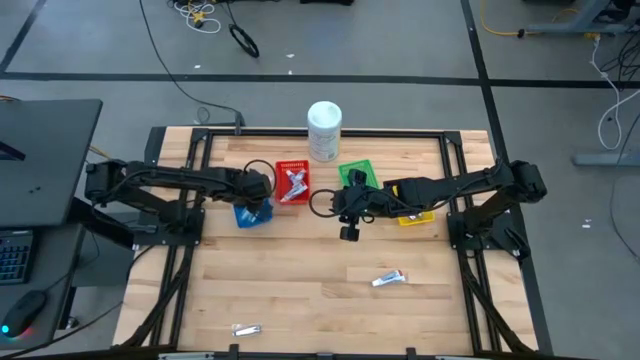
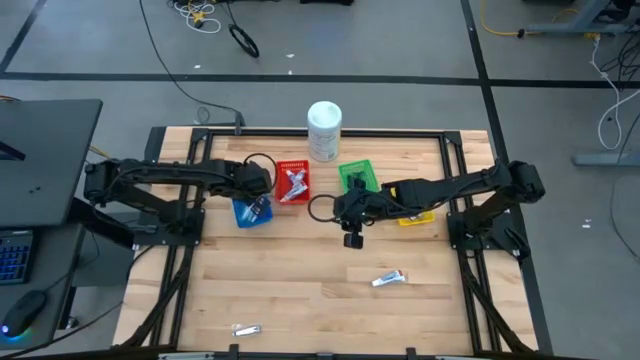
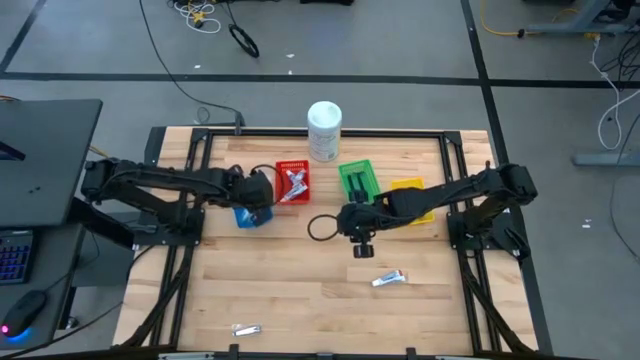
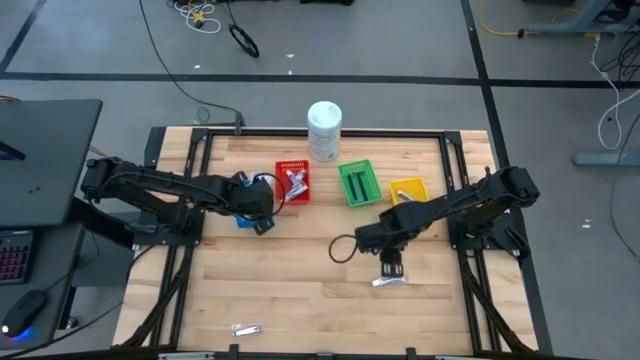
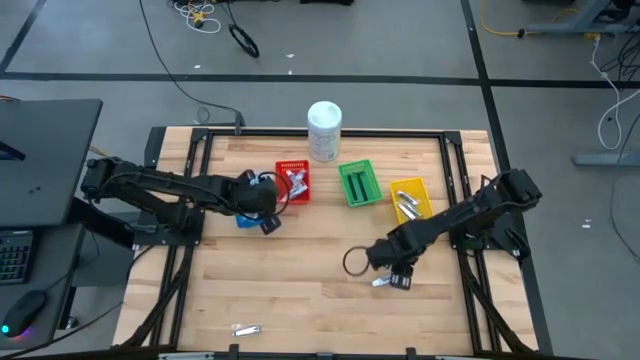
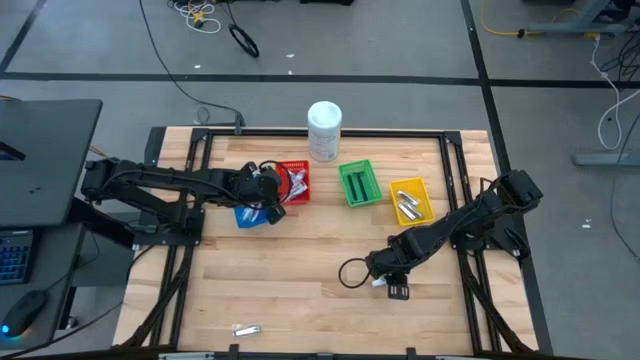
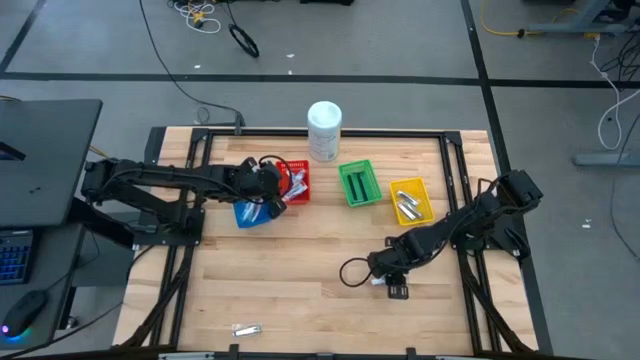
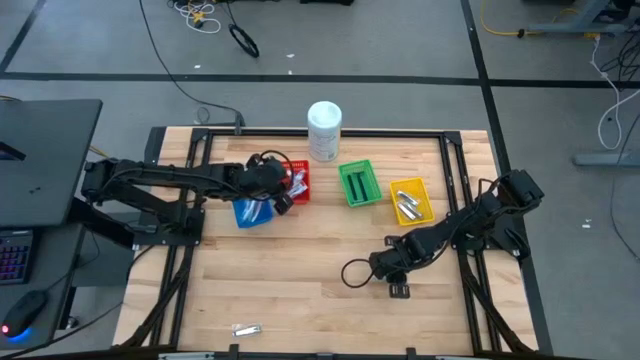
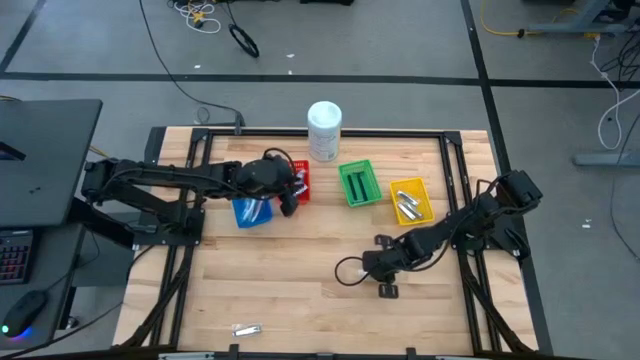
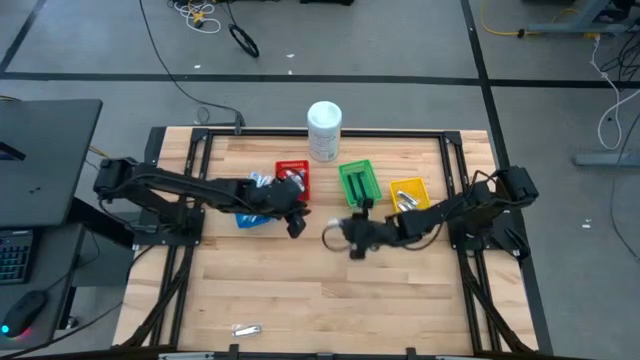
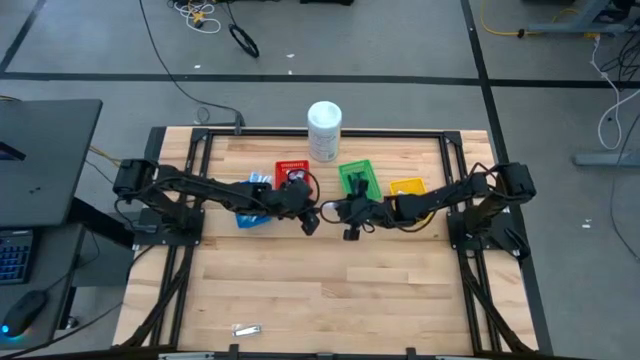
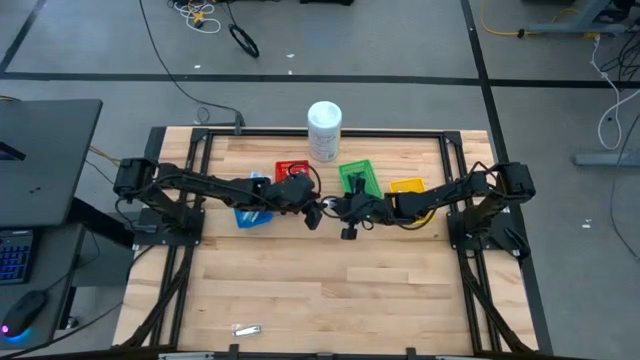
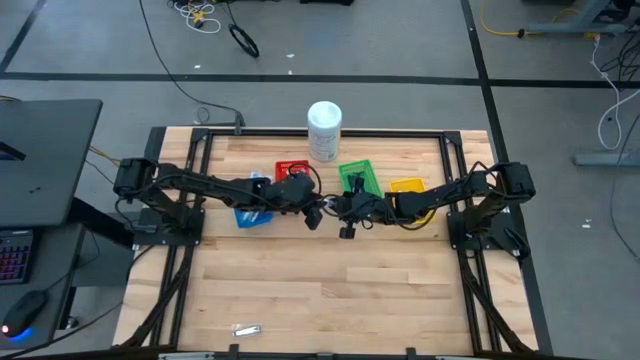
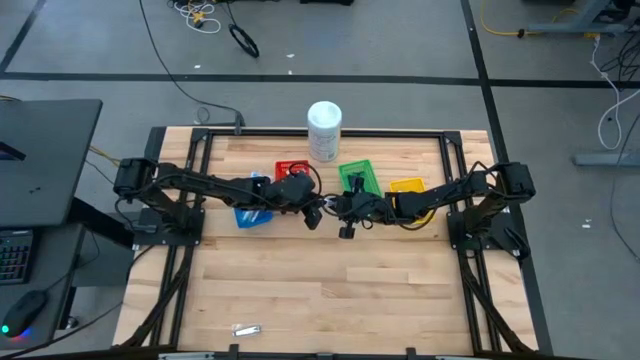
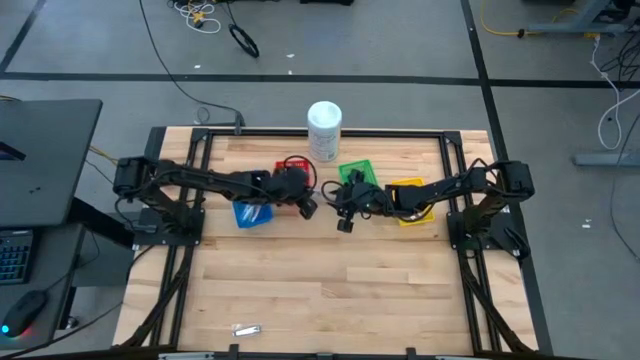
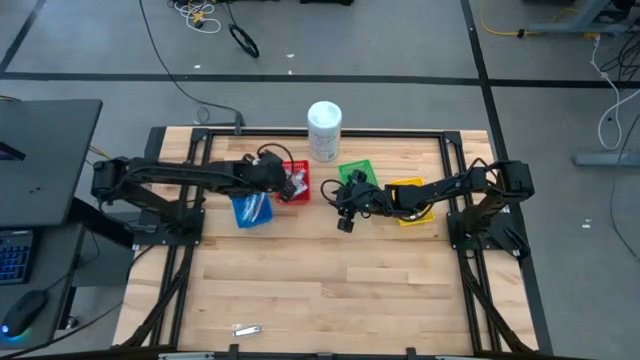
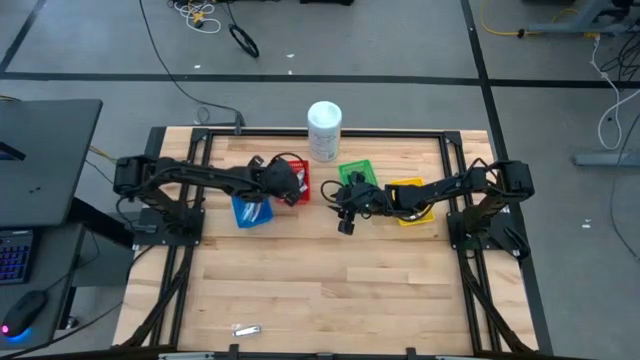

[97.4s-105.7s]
Task: Pick & Place Travel size toiletries
Put the white toothpaste into the red bin

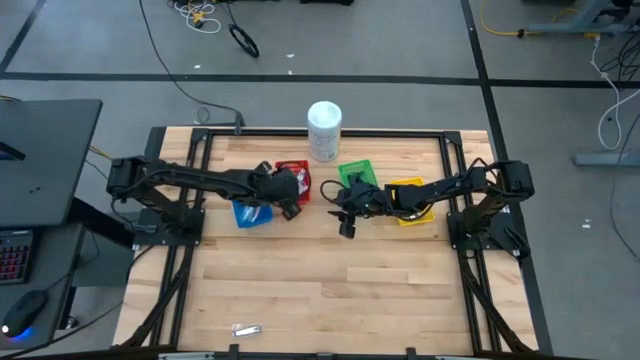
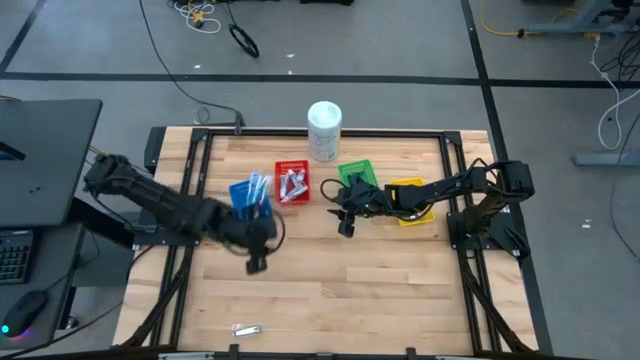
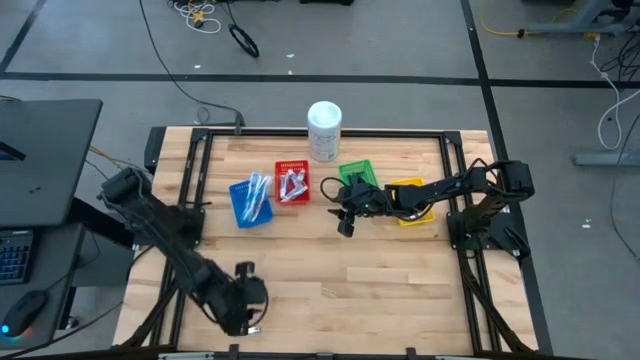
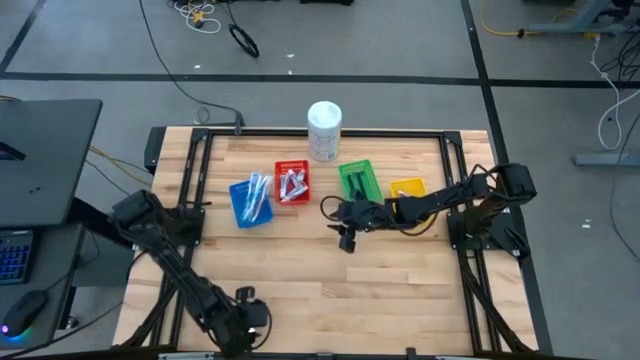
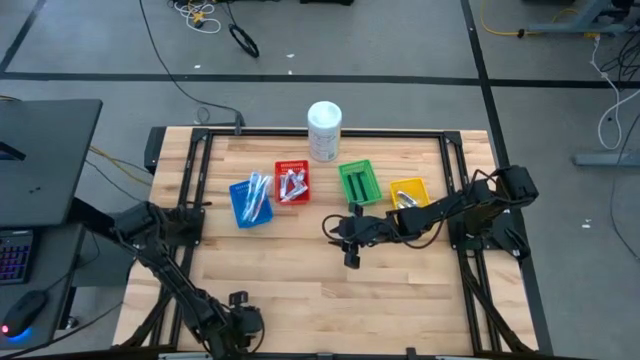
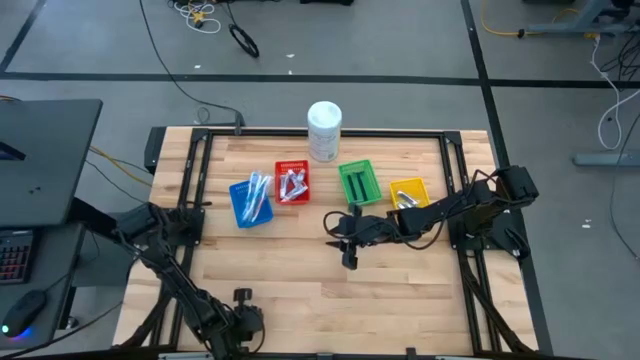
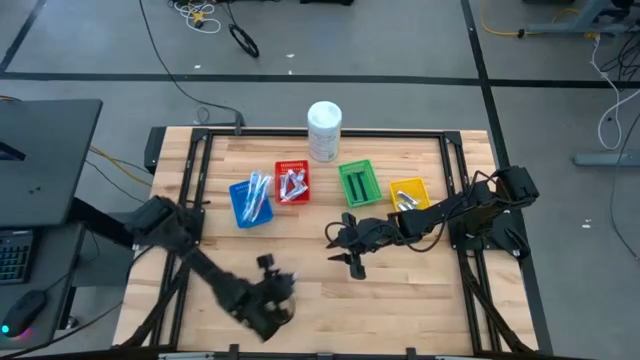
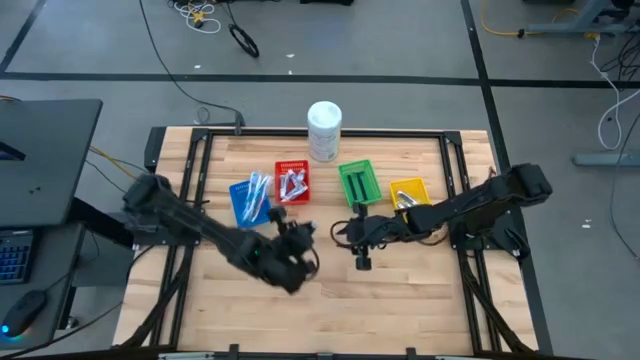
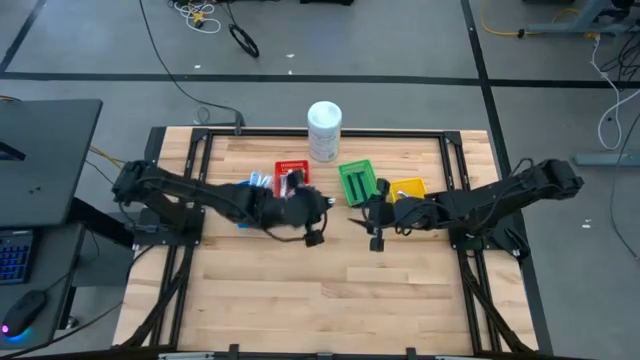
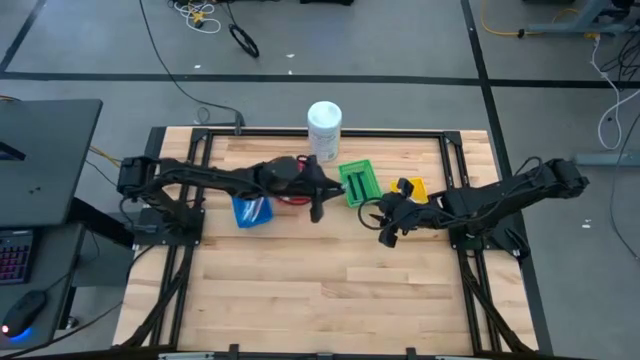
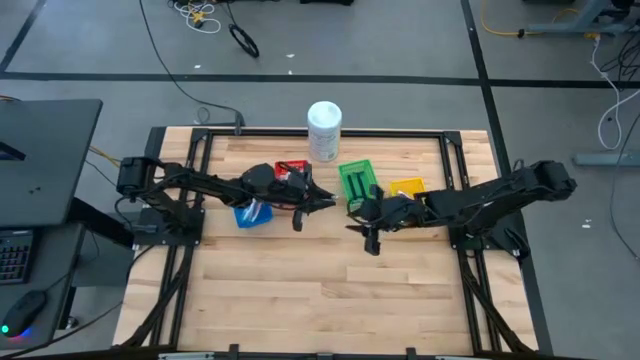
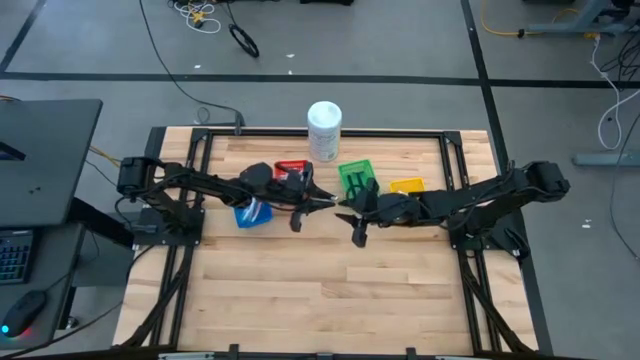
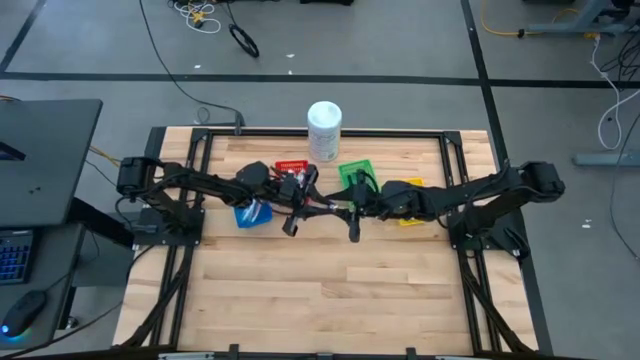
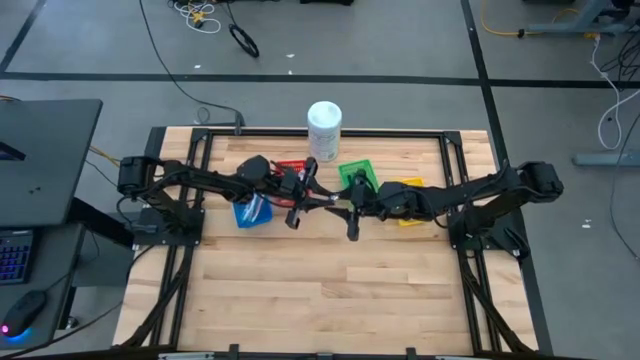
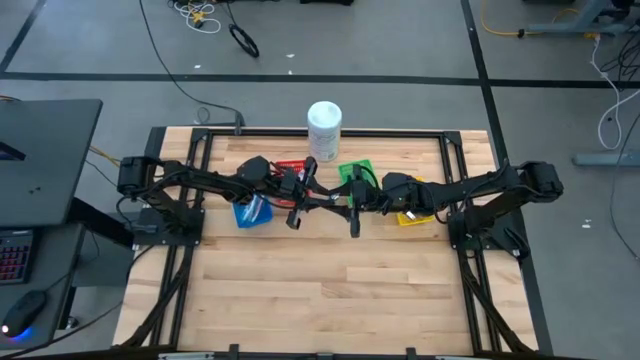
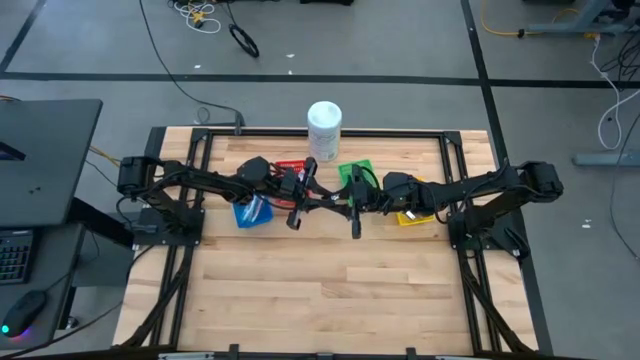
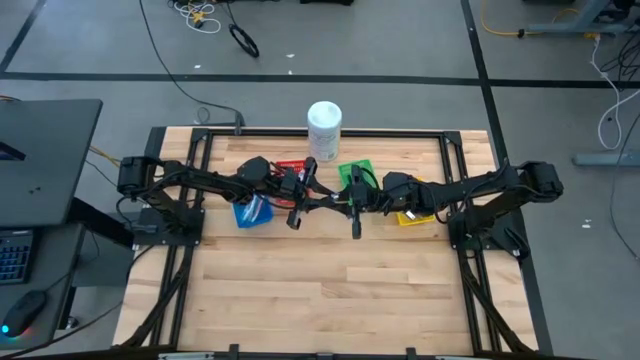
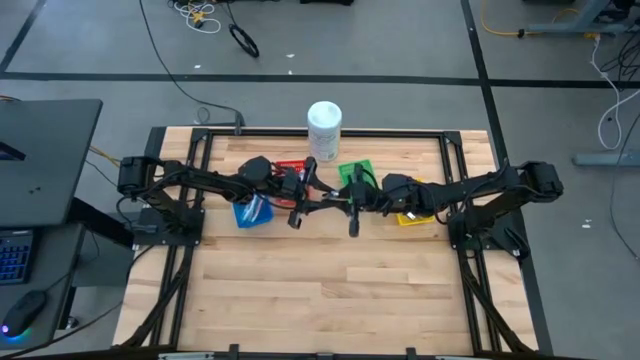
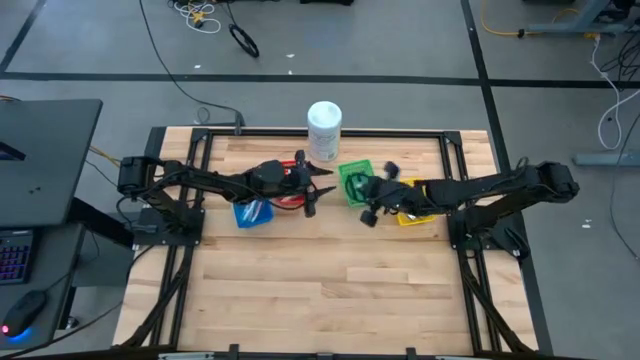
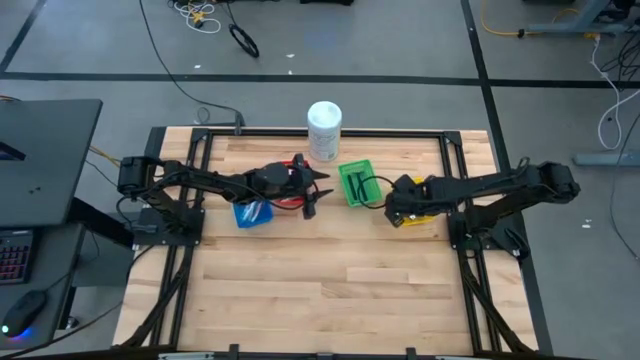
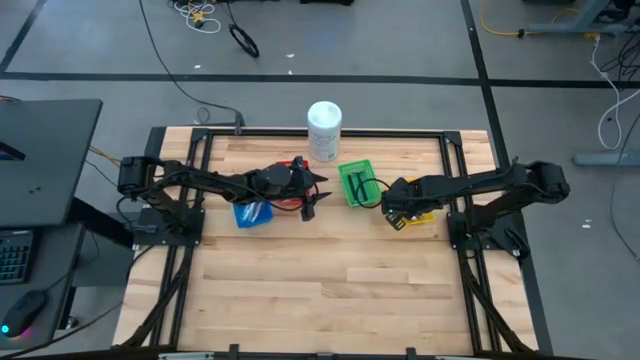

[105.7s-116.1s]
Put the nail cutter into the yellow bin

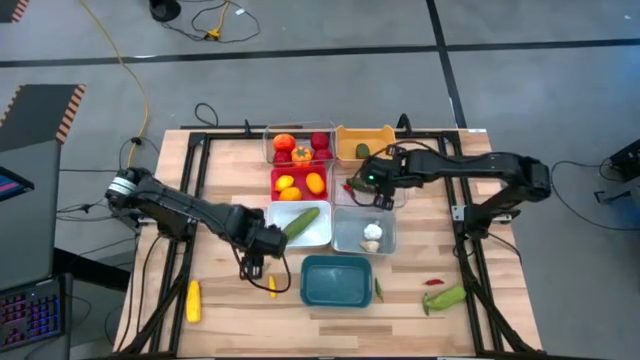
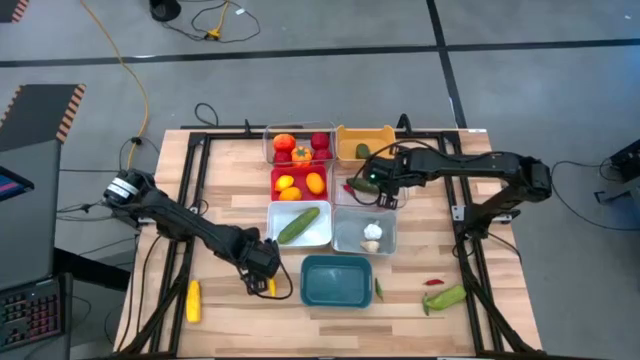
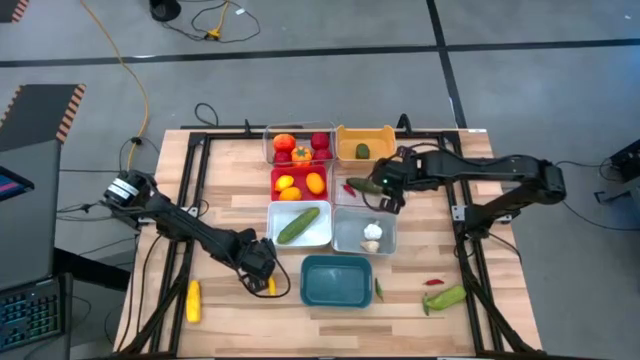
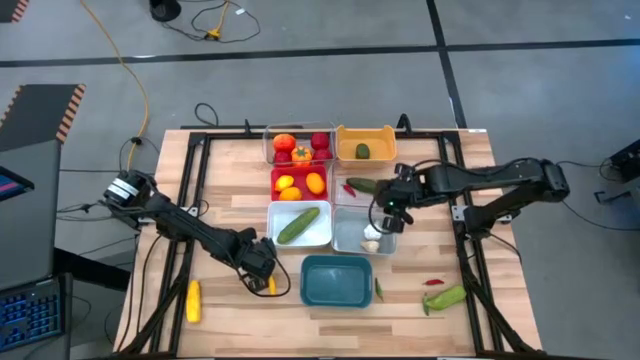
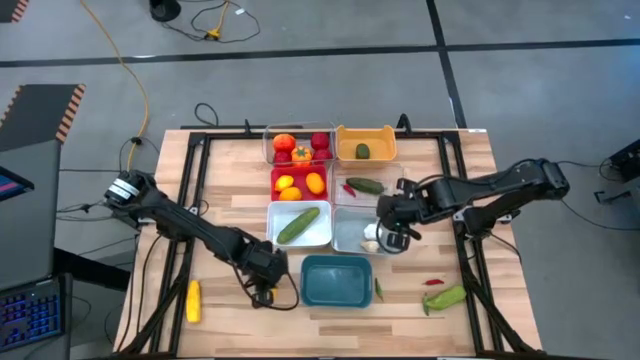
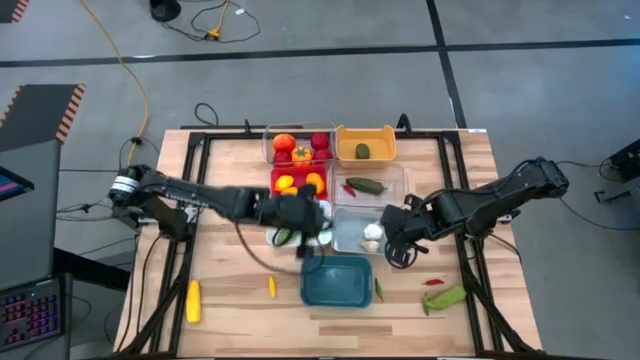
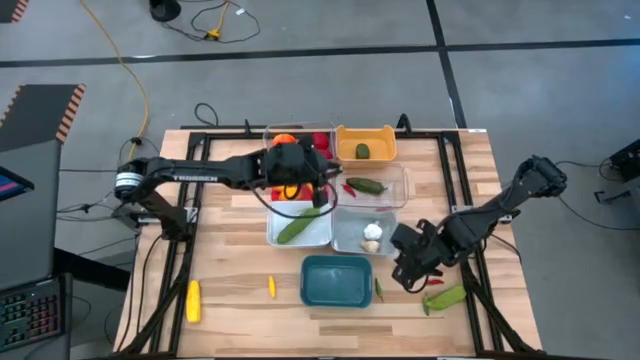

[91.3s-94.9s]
Task: Sort produce into baskets
Put the top left green chili pepper into the bottom transparent bin
